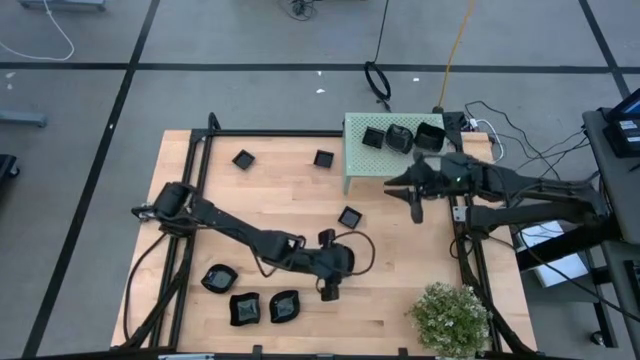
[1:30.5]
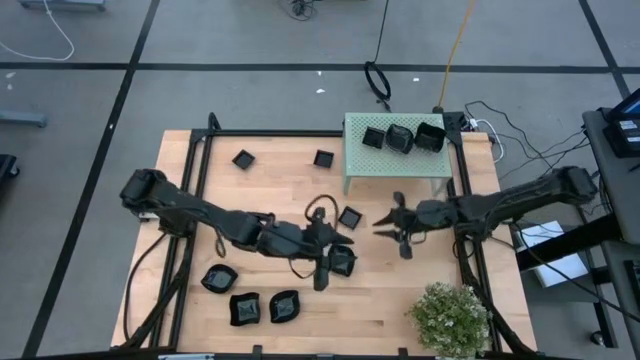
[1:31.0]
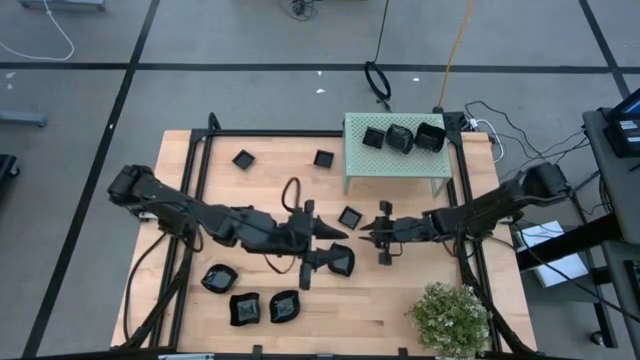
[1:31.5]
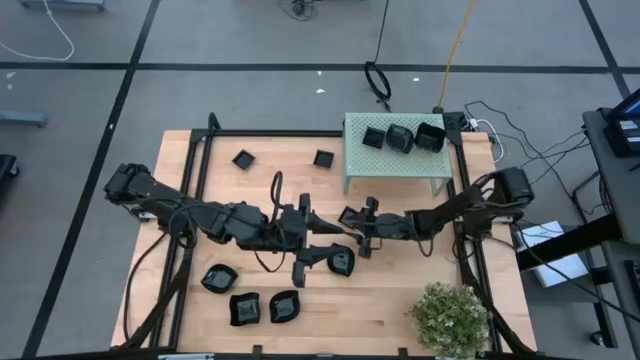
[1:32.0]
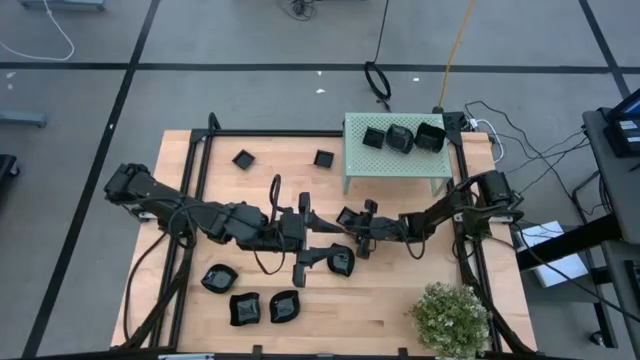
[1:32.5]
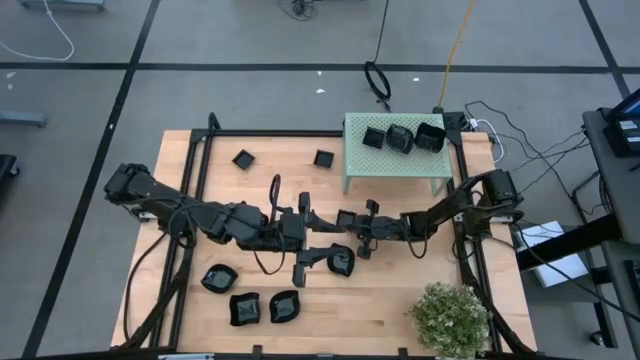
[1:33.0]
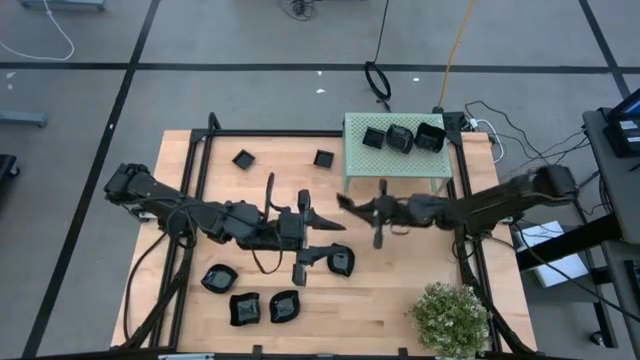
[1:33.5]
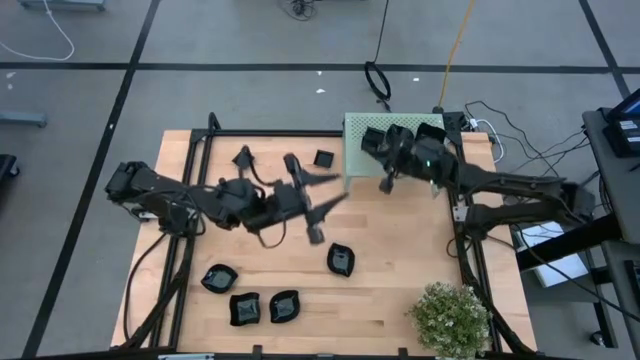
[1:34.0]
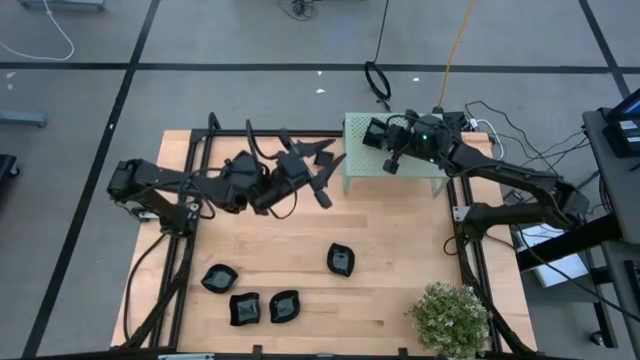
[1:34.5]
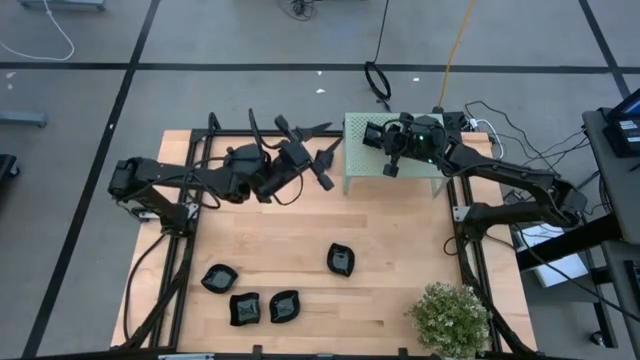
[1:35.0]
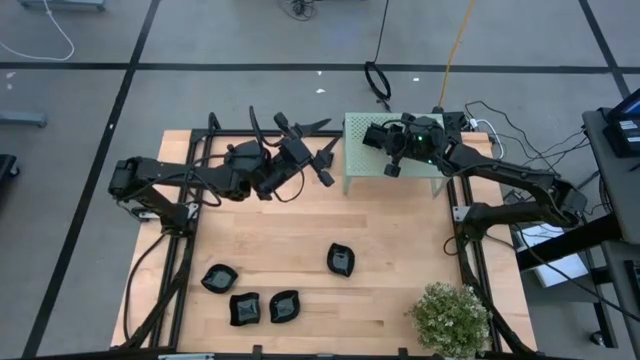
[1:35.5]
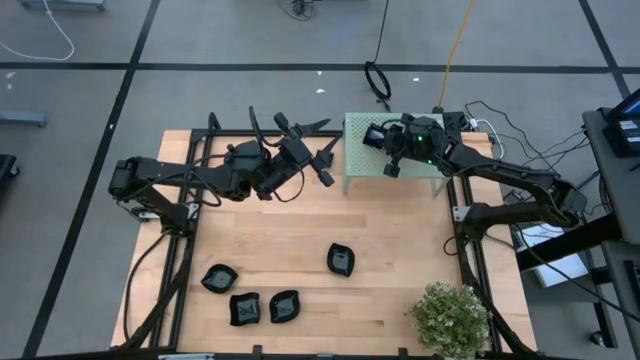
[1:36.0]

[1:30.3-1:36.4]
Task: Pick & Place Mini shaped plates
Stack the bottom square plate on top of the square plate on the shelf

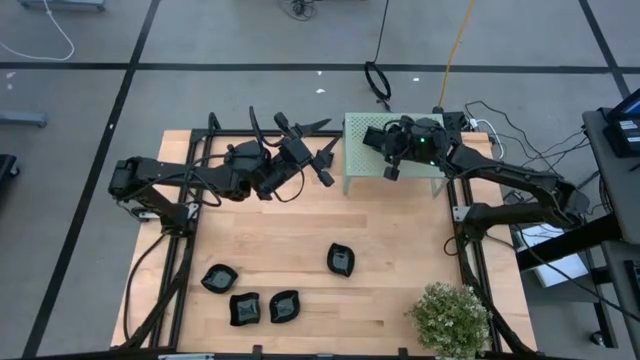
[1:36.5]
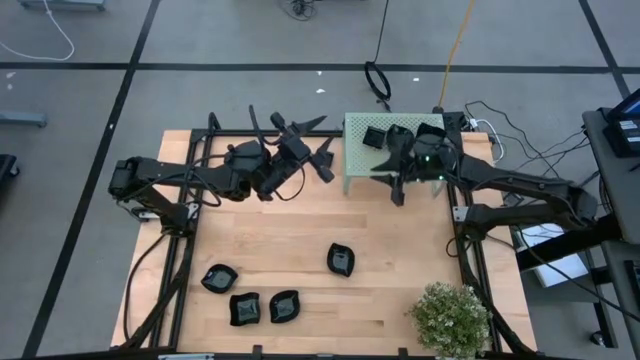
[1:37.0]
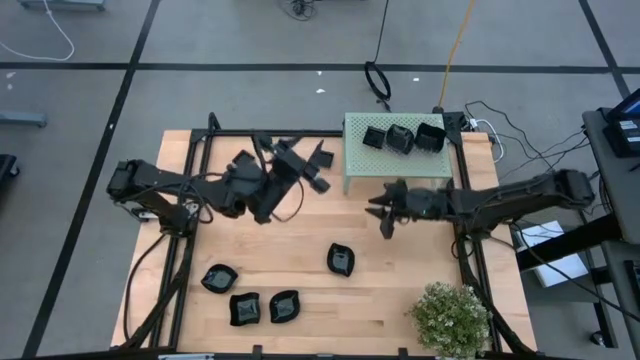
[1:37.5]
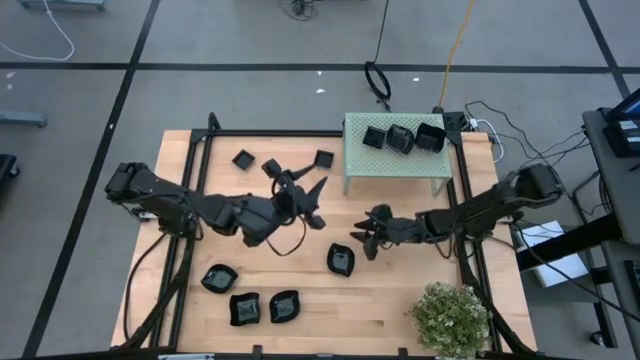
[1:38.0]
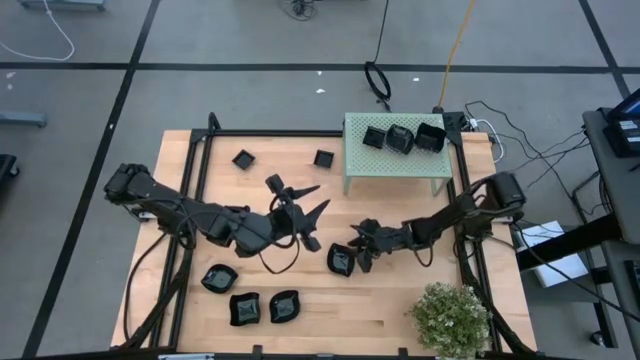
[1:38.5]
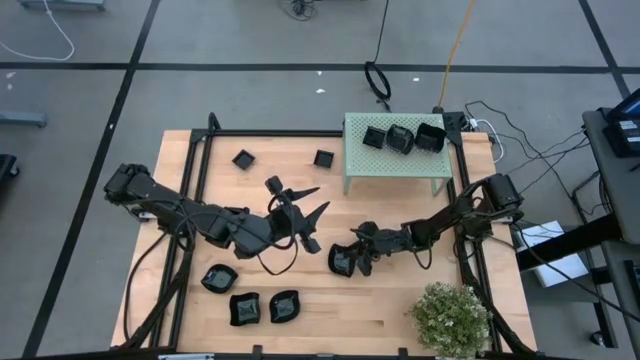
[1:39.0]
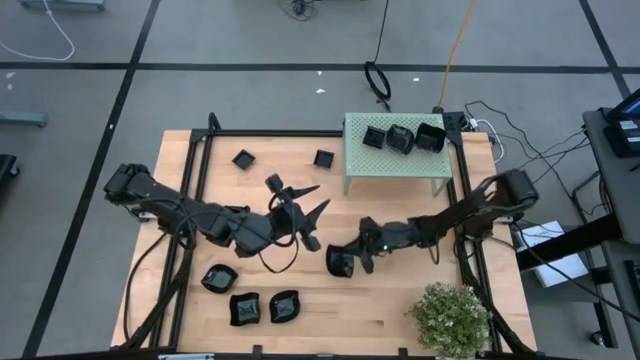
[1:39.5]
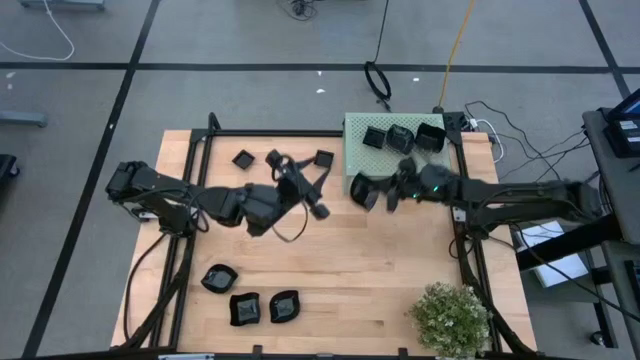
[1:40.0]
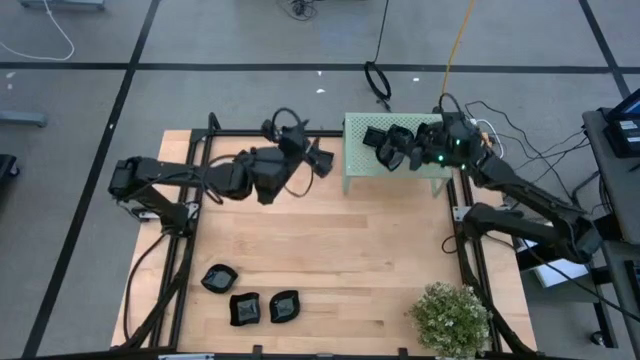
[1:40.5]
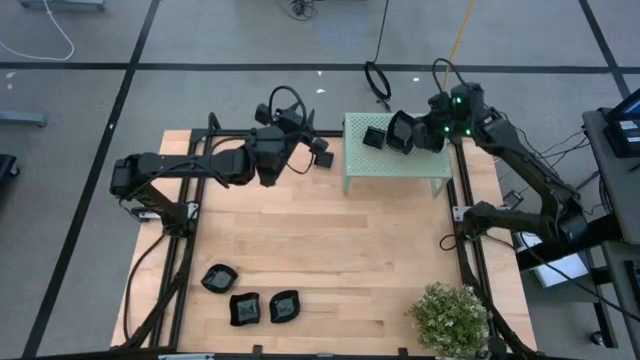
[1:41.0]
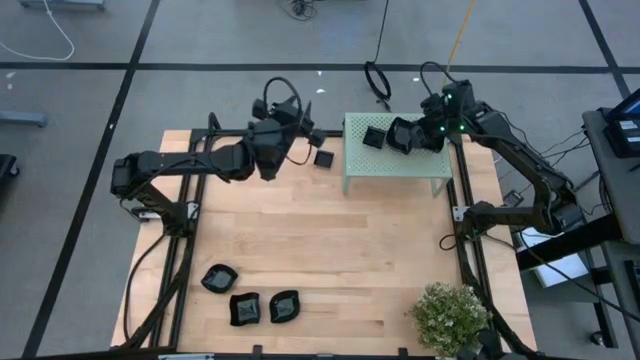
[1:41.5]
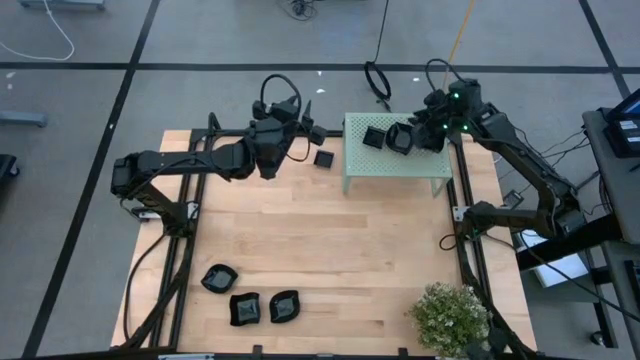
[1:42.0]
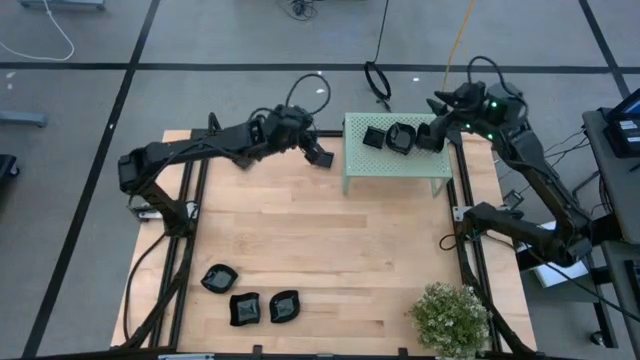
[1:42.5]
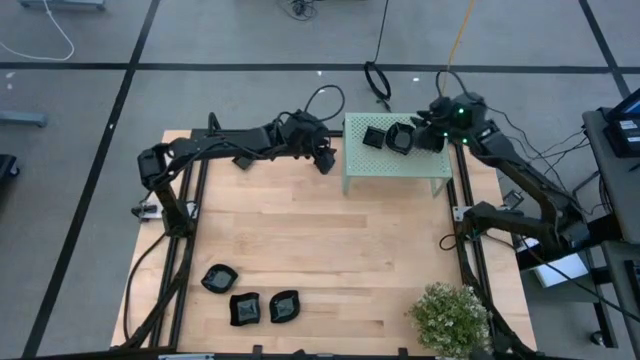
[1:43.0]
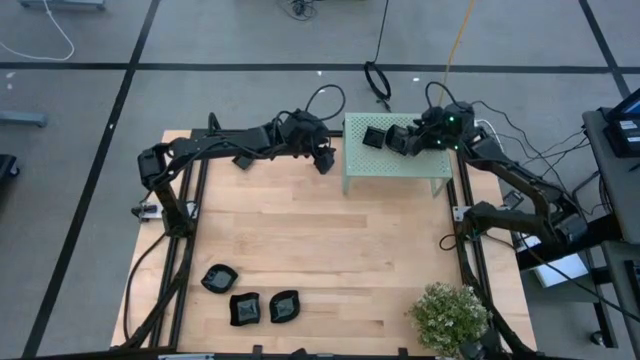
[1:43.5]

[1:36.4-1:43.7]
Stack the top right leaf-shaped plate on top of the leaf-shaped plate on the shelf

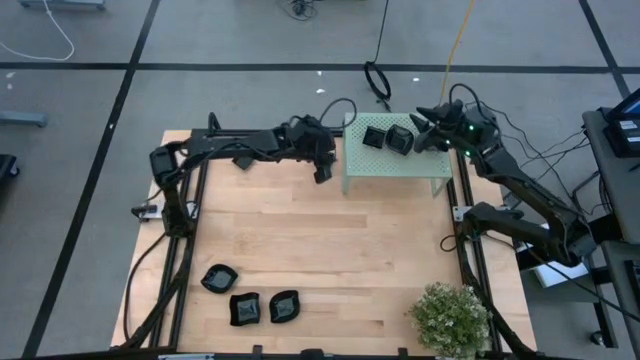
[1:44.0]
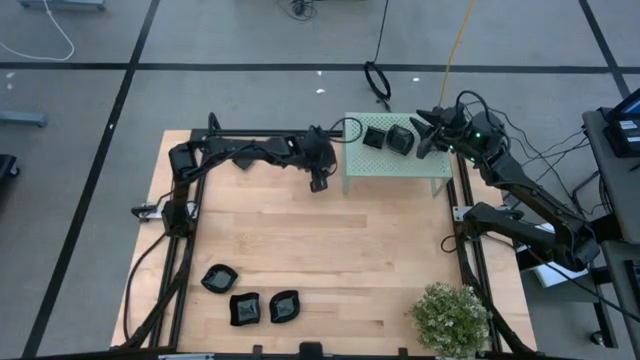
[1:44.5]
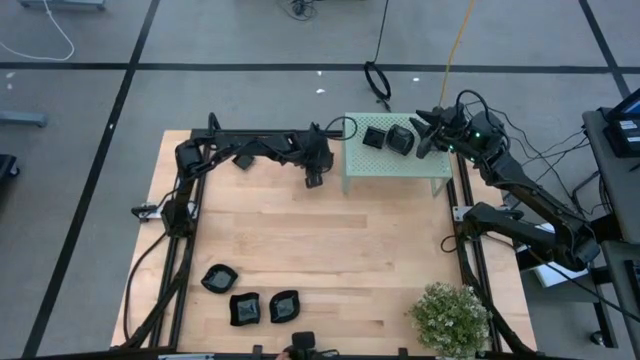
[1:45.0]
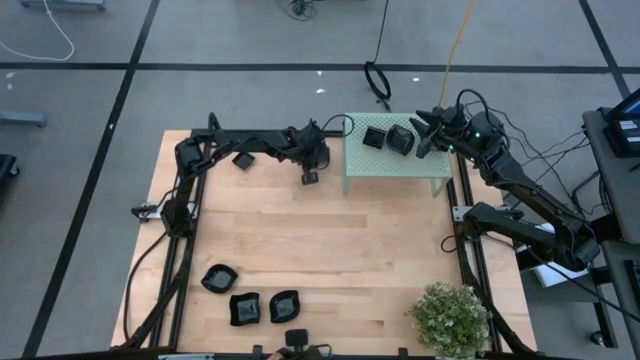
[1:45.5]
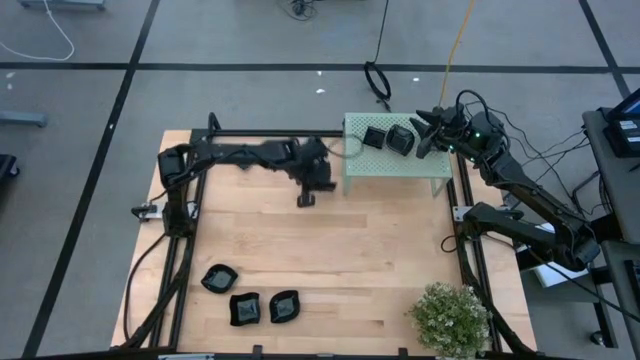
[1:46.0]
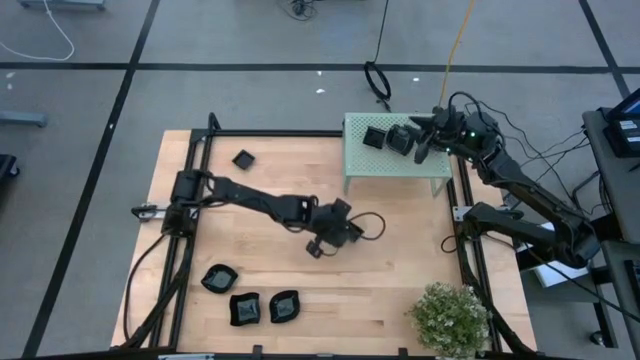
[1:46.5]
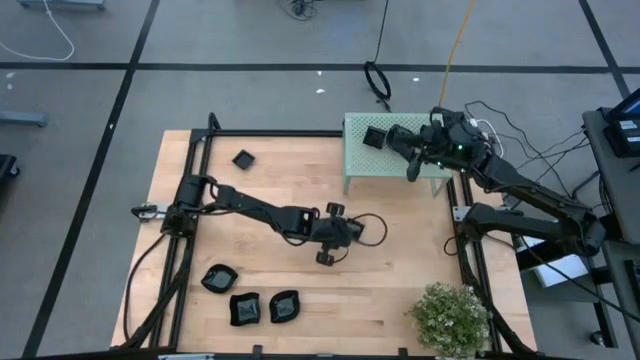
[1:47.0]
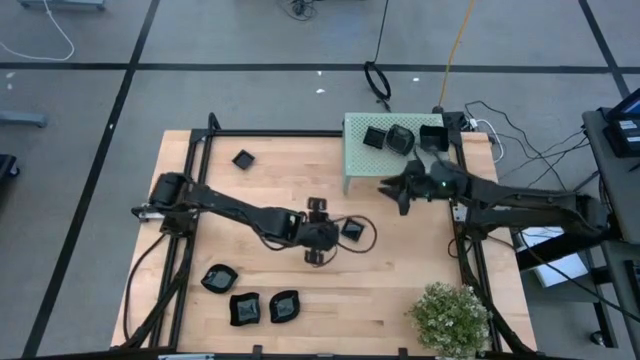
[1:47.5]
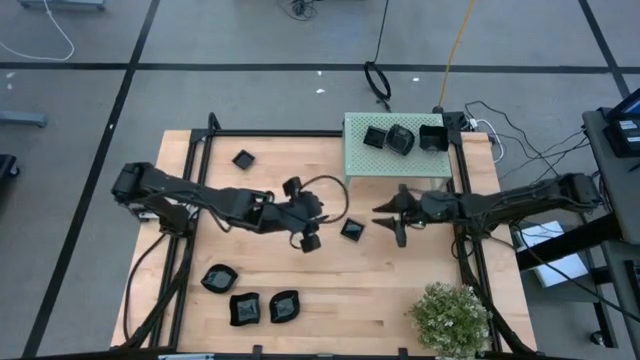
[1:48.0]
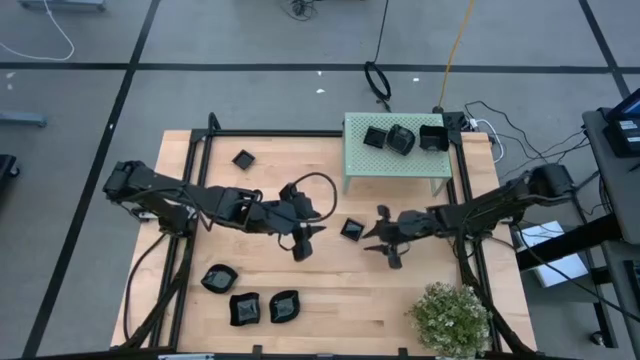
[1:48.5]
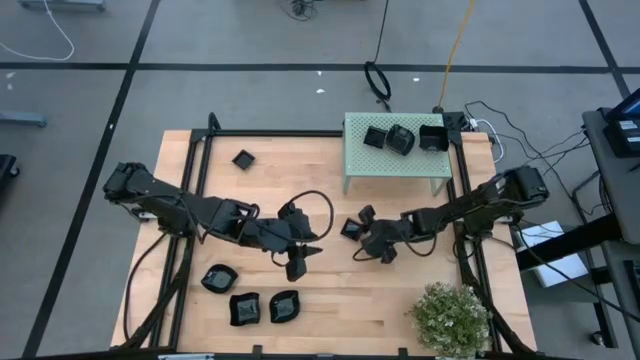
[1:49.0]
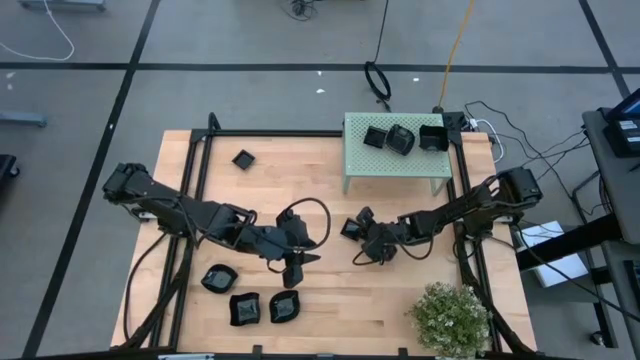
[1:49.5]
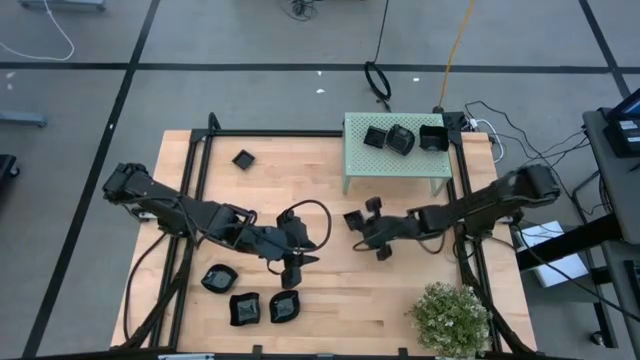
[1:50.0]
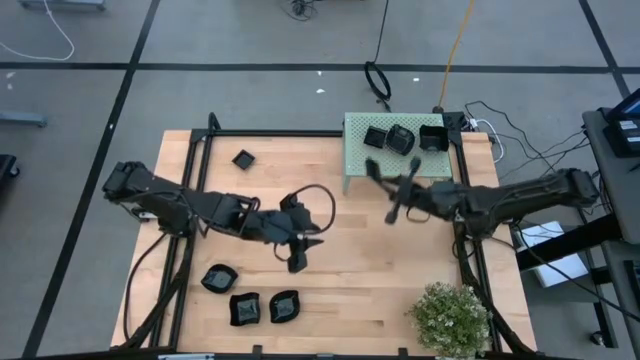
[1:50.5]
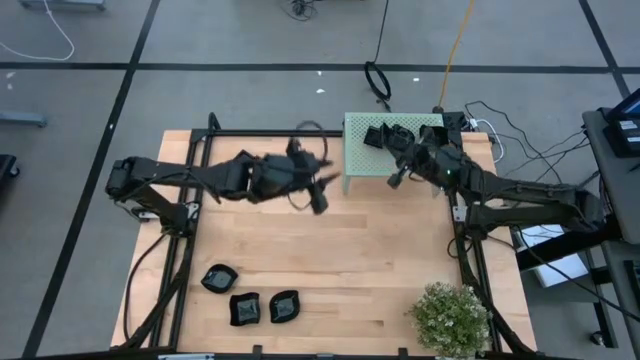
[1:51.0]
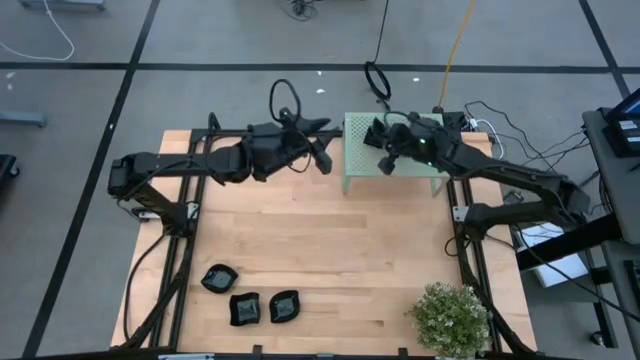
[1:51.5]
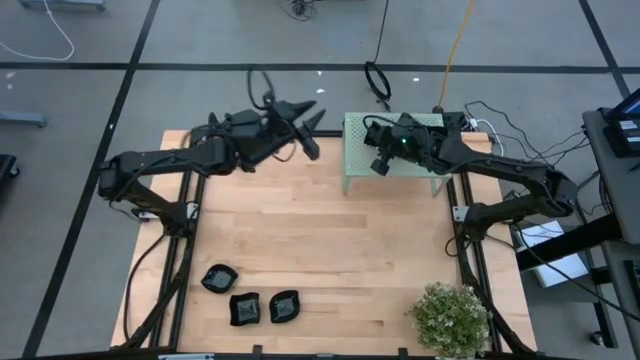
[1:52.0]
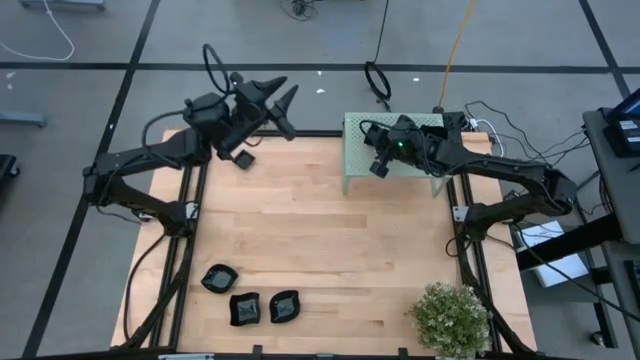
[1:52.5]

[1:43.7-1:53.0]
Stack the right square plate on top of the square plate on the shelf
